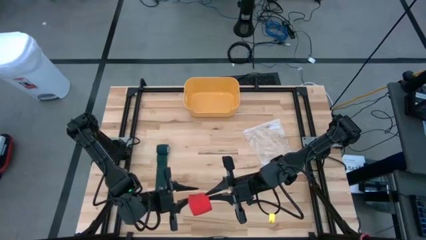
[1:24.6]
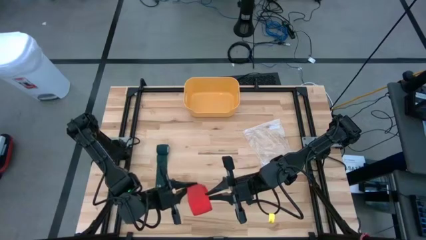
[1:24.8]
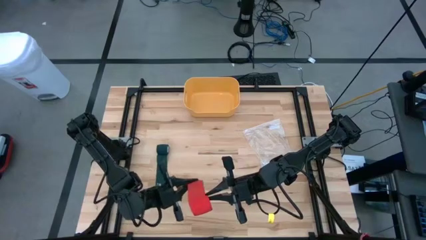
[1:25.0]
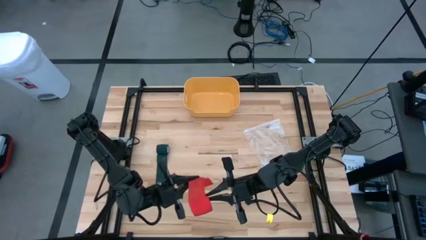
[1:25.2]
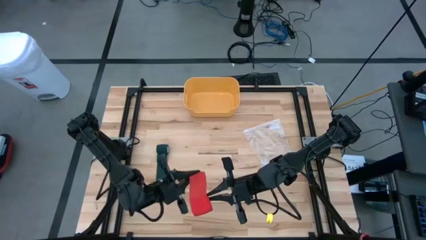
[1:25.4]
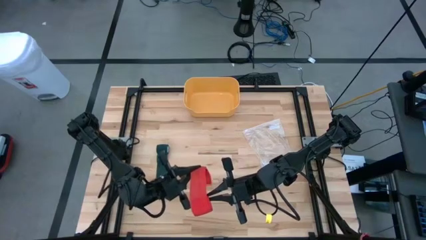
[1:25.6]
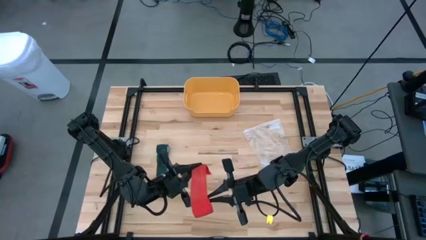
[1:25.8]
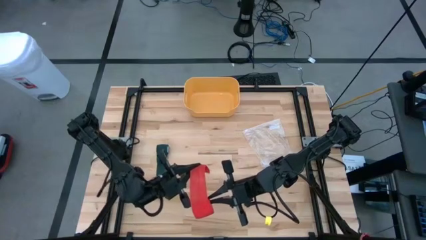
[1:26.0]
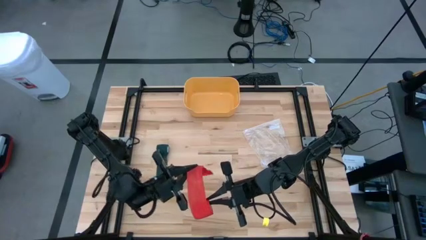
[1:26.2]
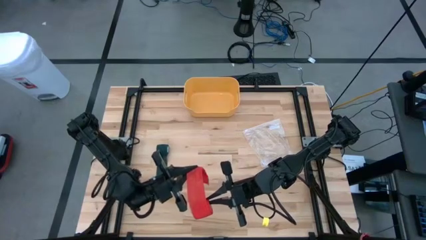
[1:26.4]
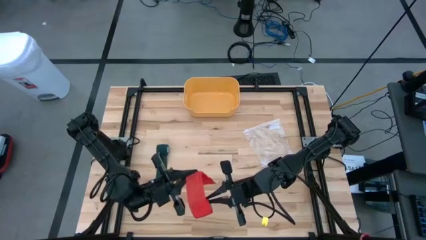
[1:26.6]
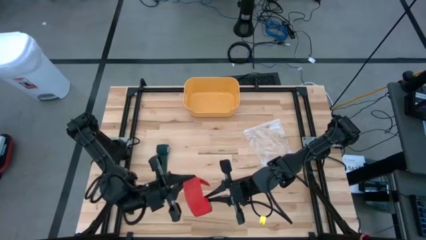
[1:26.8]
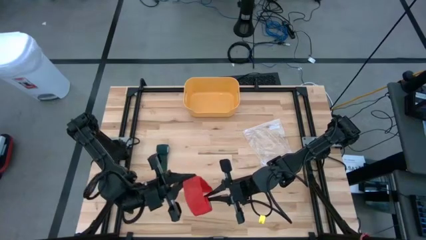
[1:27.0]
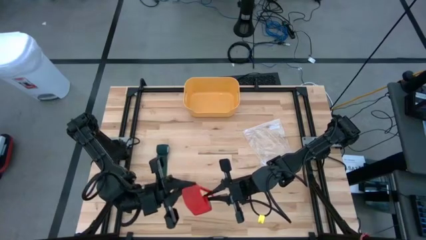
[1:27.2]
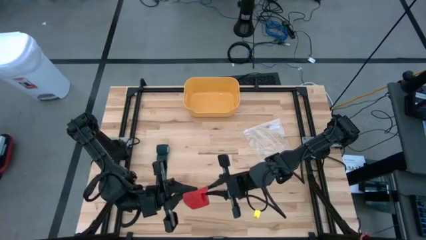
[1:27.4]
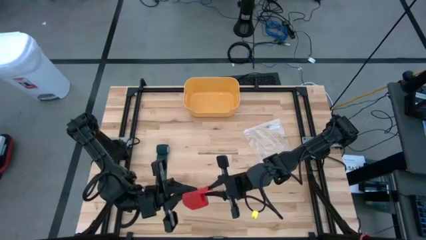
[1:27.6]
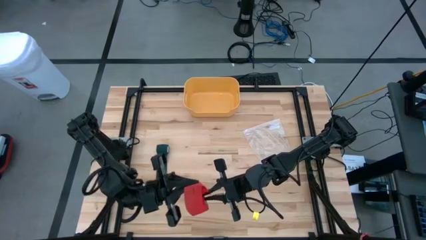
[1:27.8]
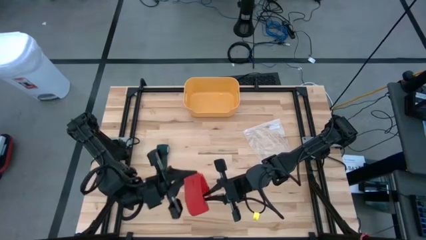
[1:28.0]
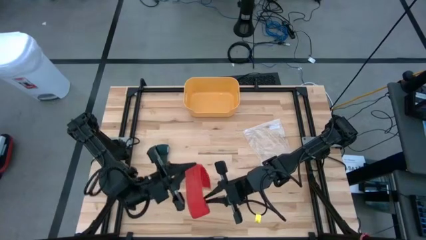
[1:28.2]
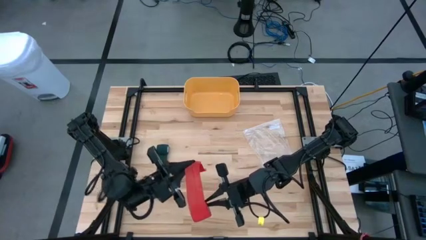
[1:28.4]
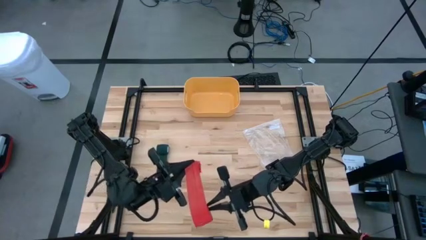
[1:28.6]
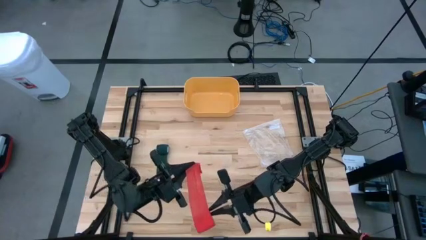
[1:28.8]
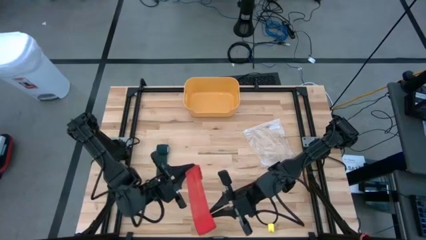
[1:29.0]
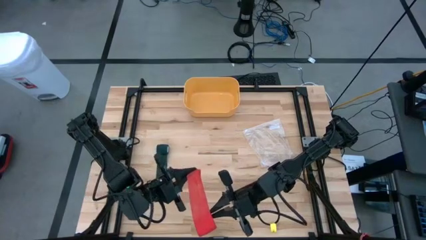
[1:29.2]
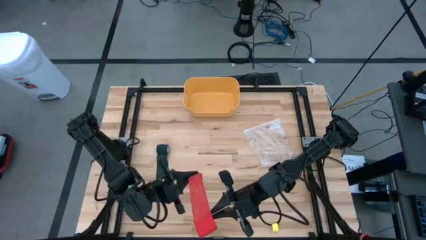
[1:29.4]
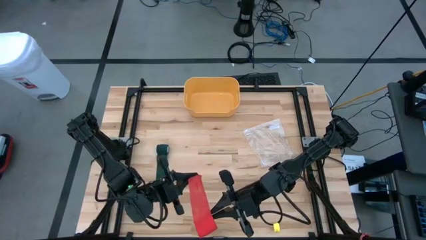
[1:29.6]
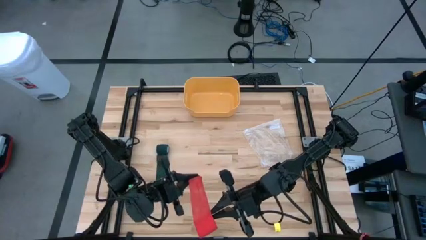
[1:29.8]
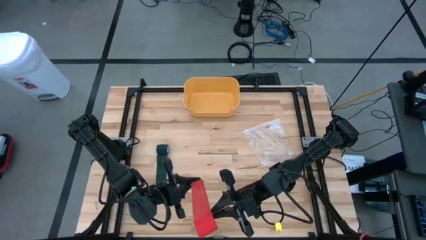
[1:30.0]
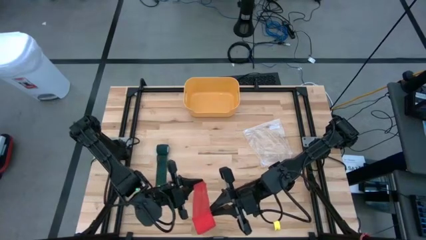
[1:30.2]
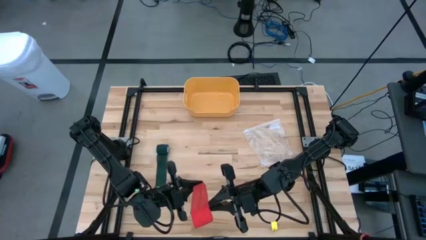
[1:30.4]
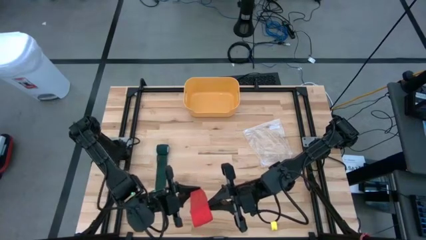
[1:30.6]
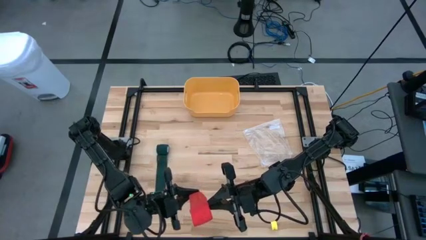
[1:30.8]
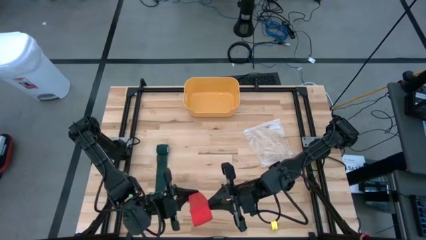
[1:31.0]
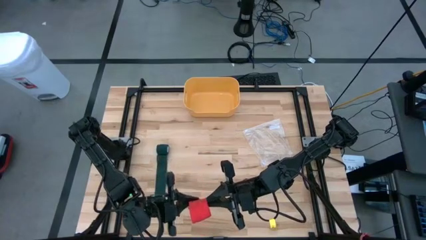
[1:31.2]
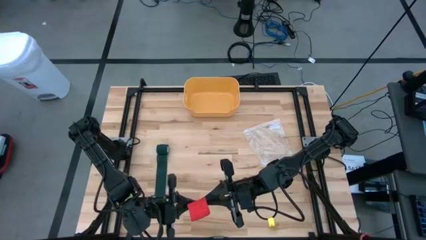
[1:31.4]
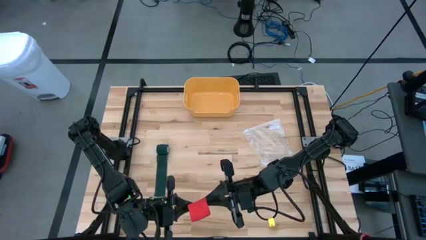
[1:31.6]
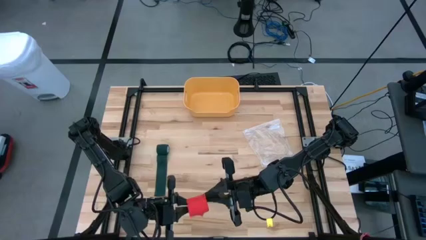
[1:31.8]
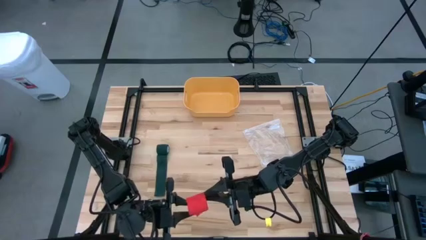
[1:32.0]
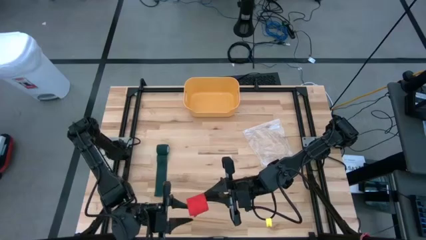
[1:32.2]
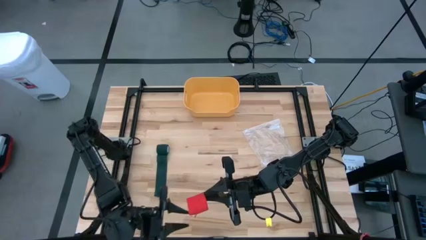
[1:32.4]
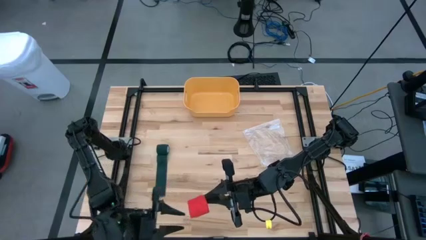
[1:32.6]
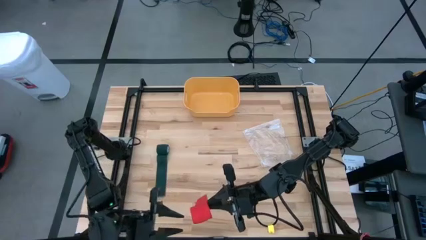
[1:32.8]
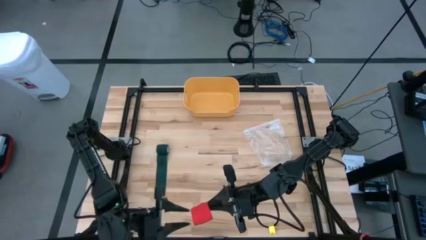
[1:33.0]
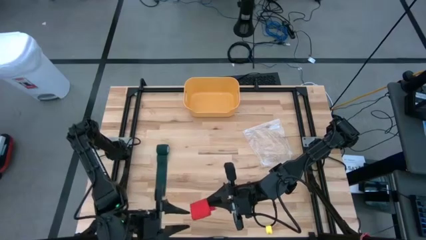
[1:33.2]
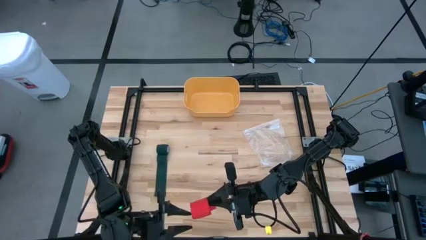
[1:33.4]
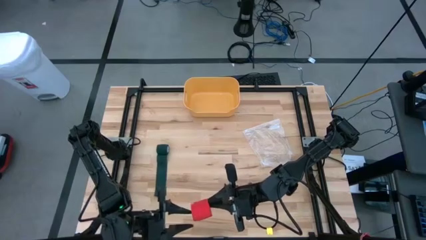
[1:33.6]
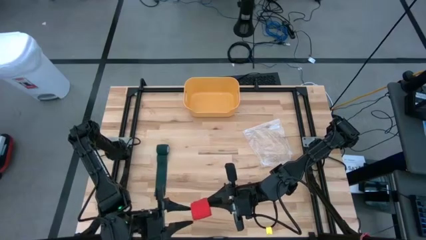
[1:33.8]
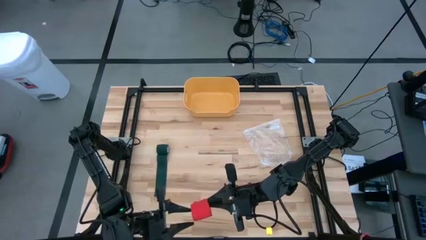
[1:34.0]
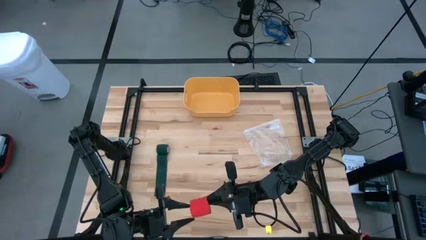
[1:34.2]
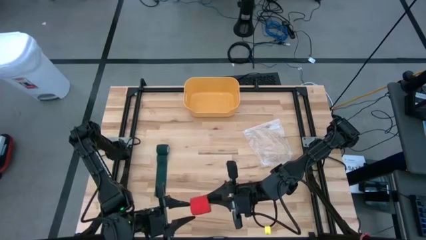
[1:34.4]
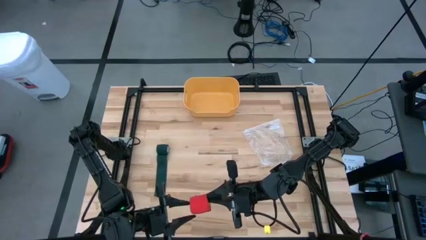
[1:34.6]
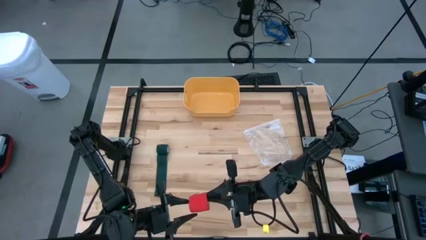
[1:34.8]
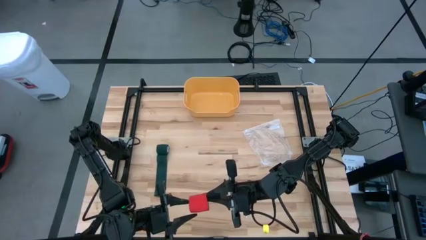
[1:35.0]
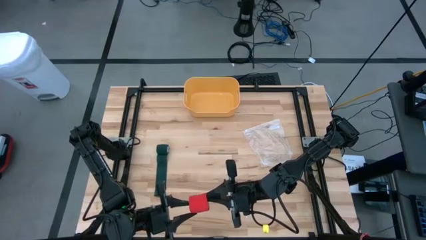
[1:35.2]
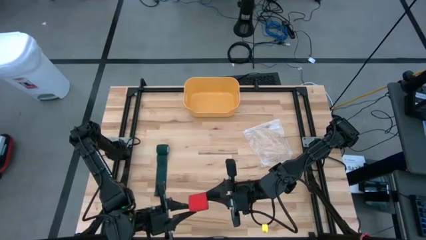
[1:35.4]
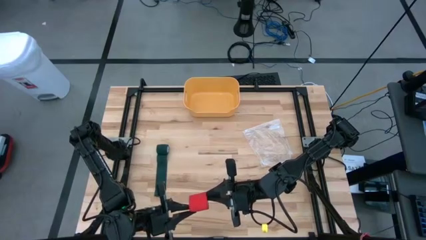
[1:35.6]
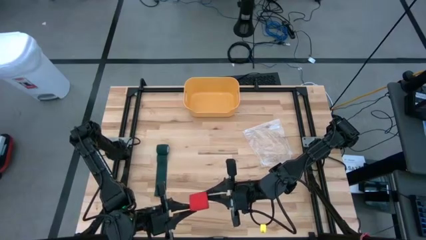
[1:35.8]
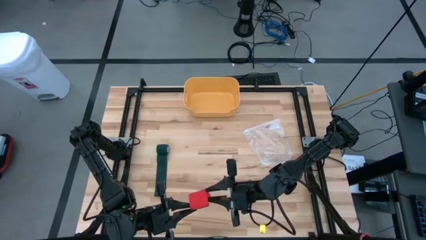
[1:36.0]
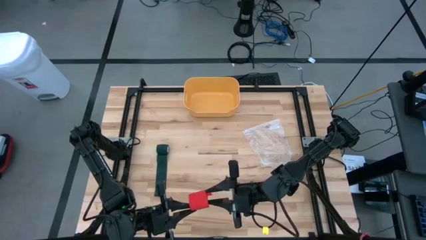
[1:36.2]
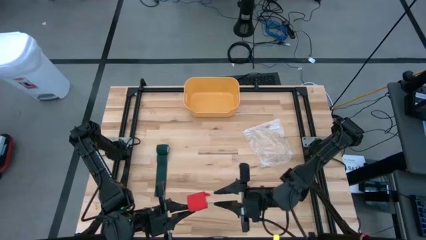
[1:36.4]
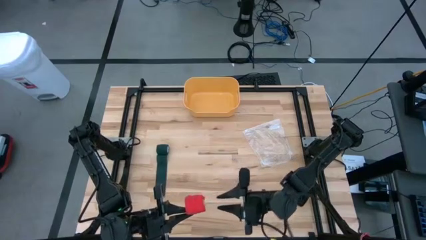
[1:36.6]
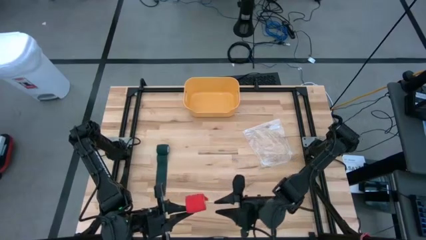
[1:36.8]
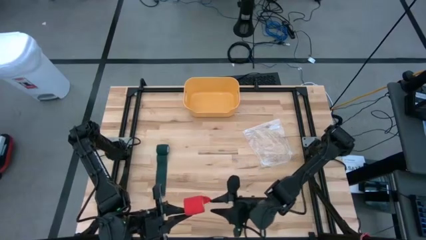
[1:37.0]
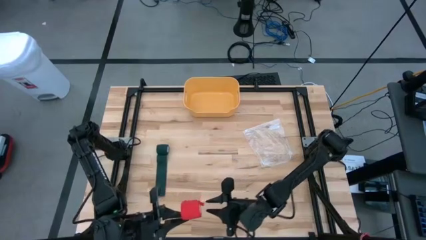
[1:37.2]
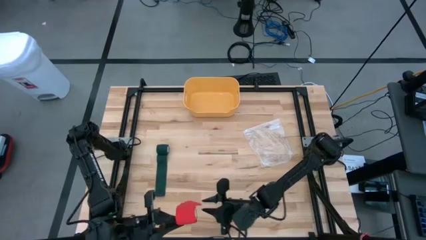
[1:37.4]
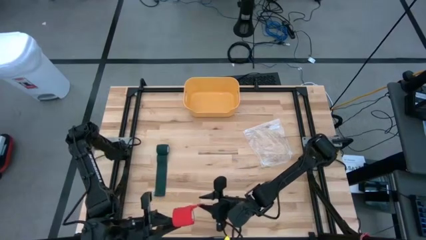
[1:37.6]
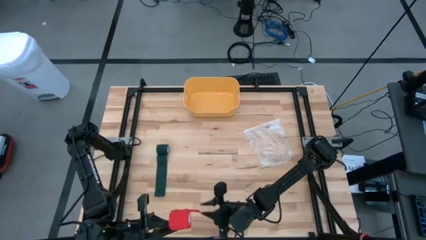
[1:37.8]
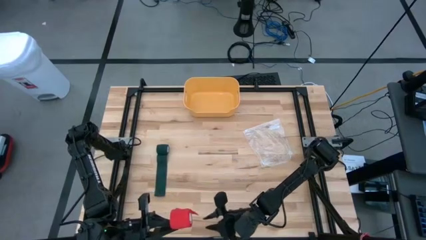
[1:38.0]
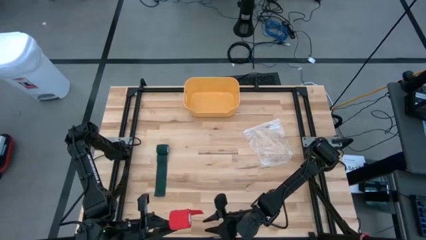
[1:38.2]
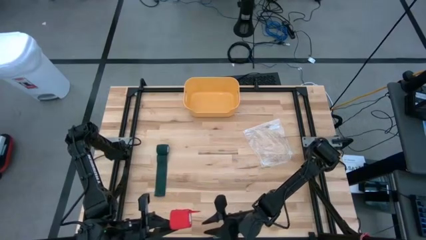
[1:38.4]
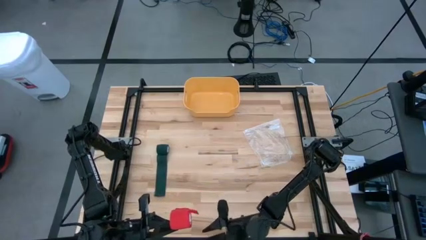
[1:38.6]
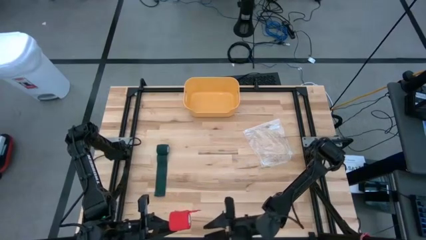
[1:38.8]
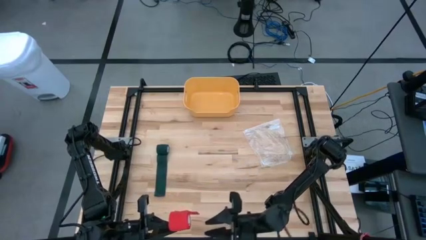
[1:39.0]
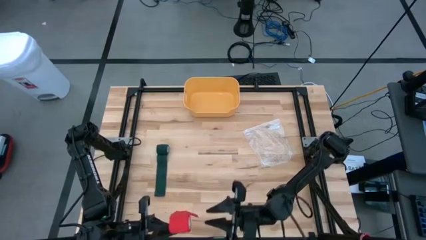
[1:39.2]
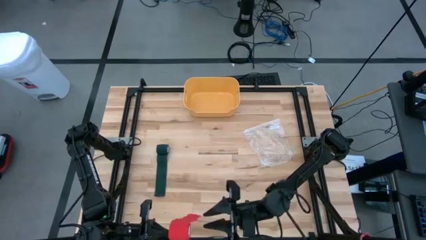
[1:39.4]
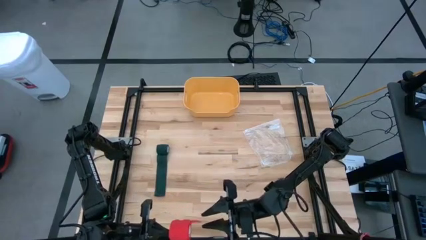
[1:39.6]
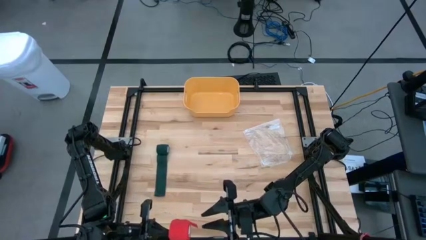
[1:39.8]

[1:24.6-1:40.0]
Task: Roll bandage
Roll the red bandage
